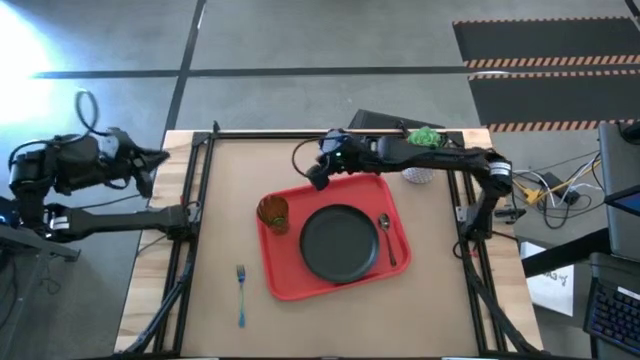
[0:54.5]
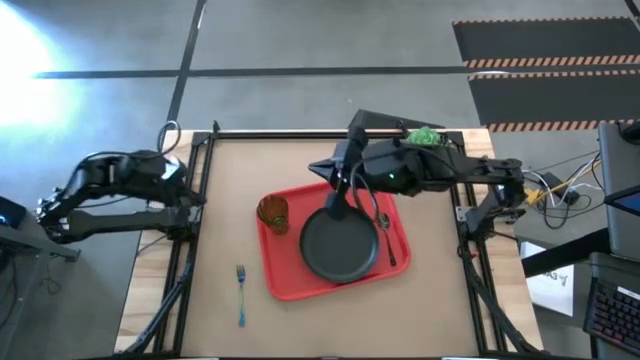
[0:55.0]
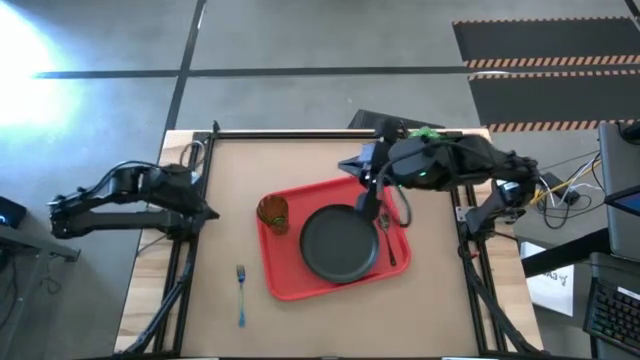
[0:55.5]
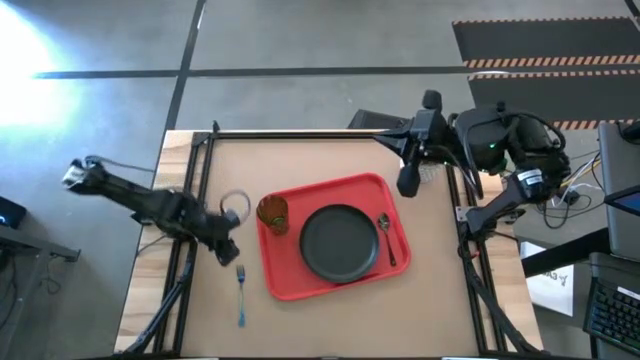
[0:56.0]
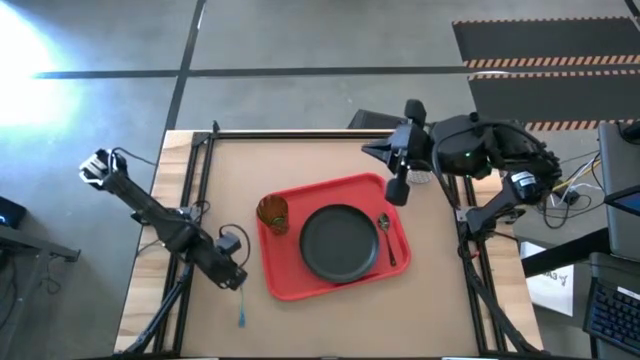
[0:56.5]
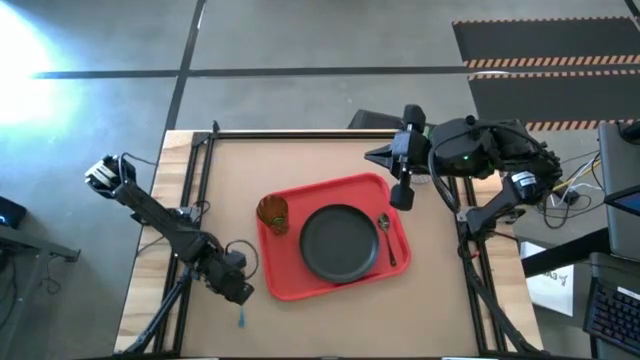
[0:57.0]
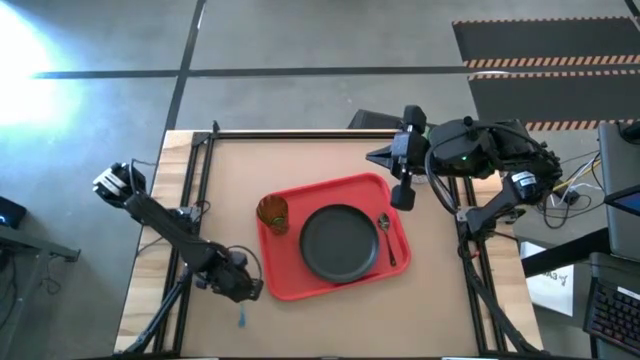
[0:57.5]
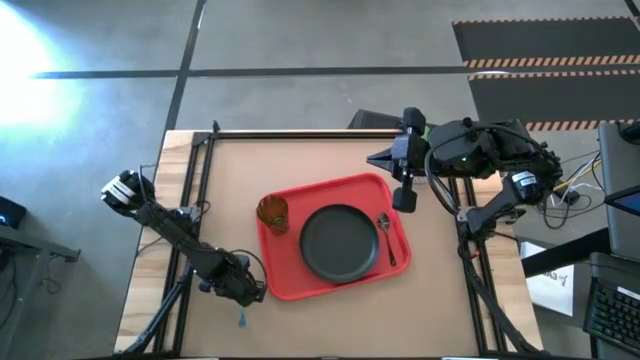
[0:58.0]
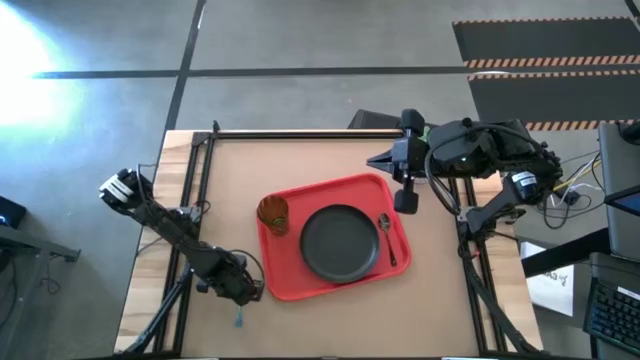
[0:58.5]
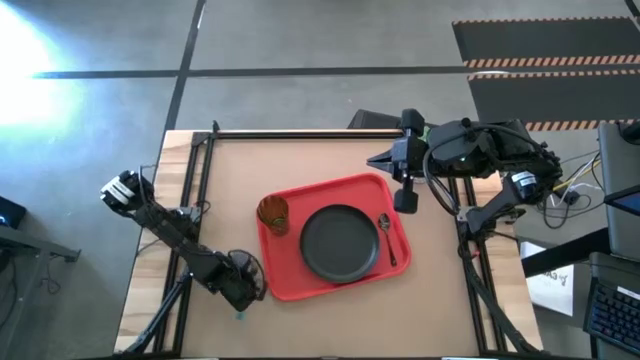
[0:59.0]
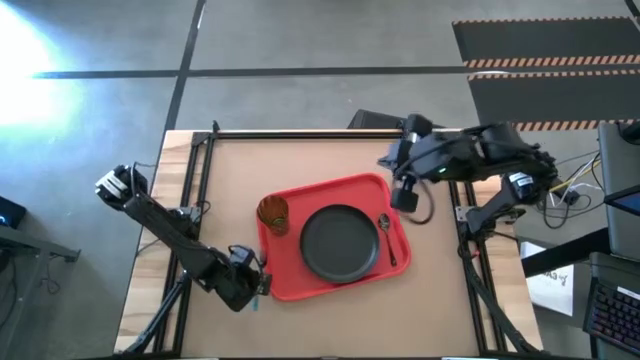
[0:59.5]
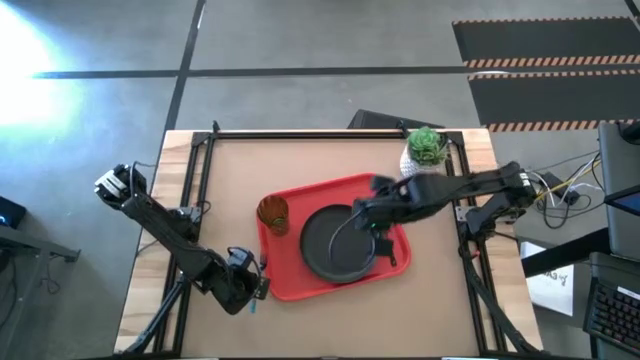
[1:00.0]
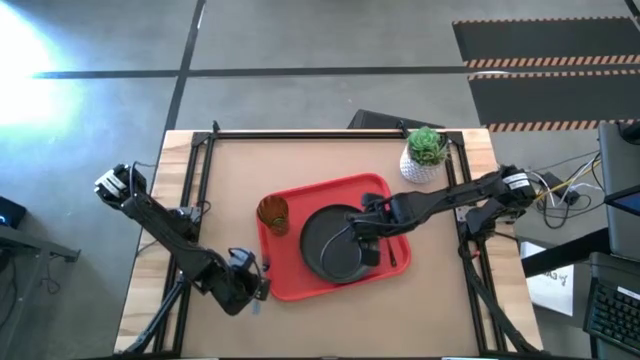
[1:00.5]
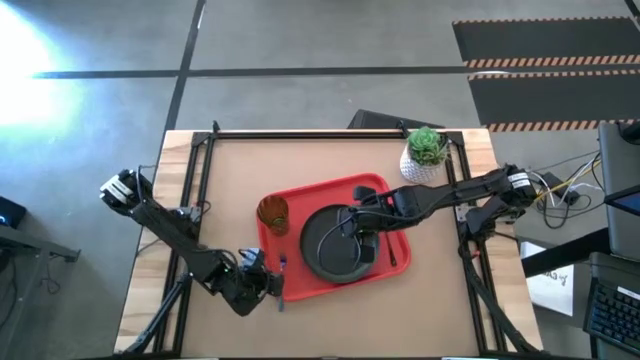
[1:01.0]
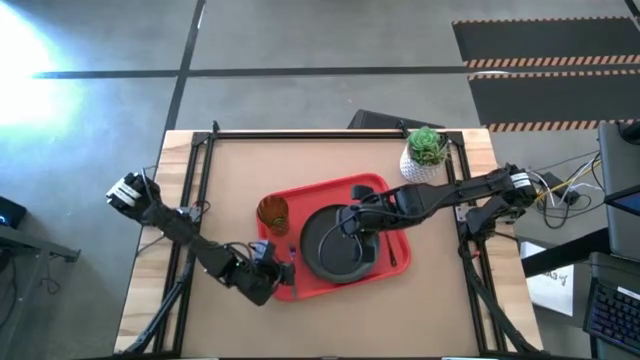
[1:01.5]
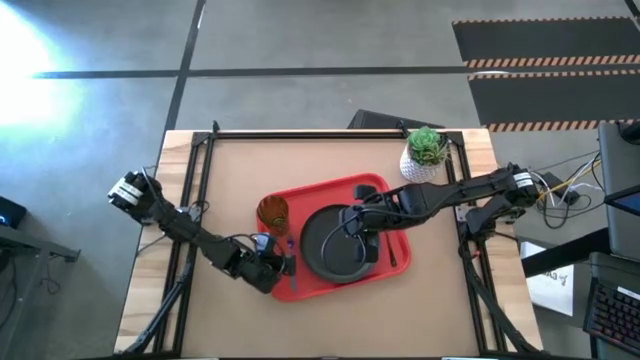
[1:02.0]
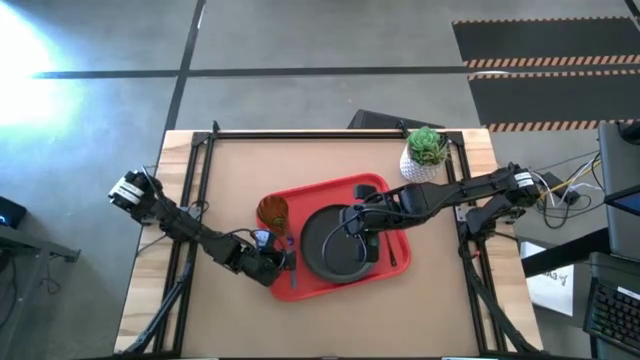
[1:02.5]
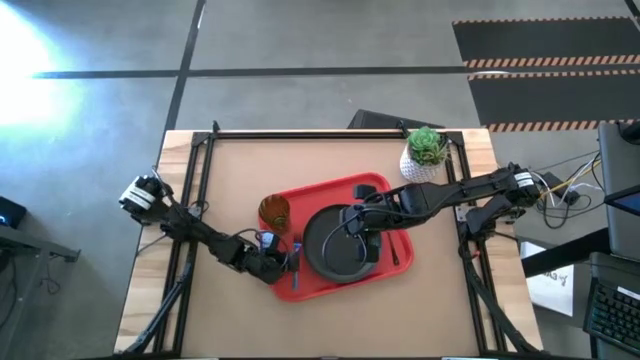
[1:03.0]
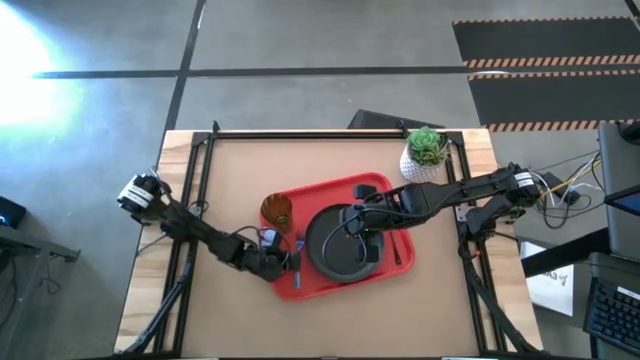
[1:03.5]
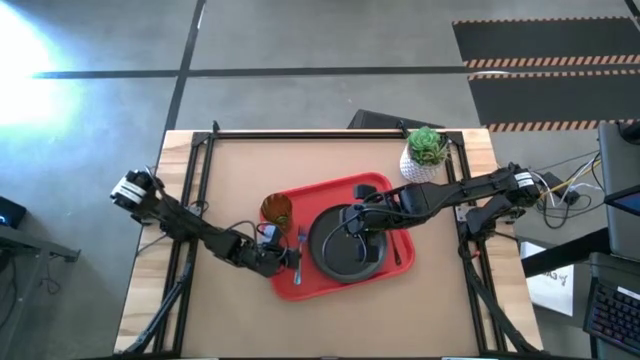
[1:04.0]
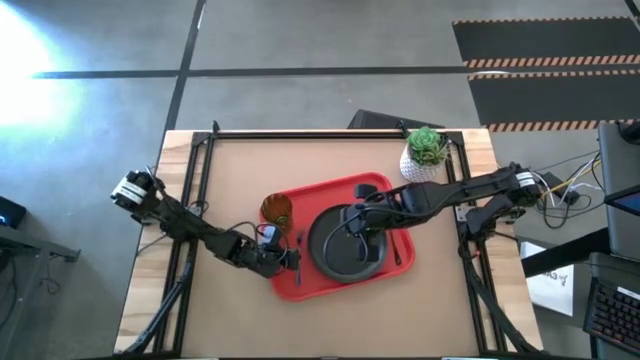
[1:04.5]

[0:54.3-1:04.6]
Task: Pick and place plate/cup/fork/spoon on tray
Put the blue fork to the left side of the black plate on the red serving tray

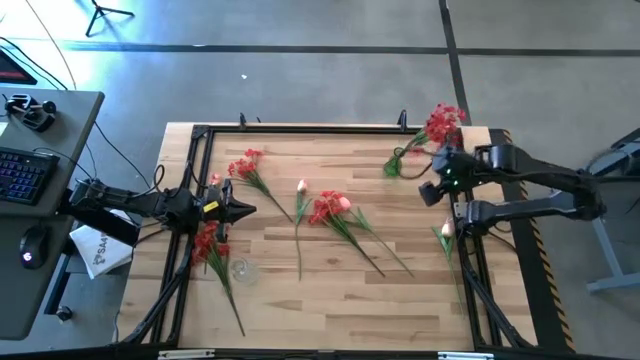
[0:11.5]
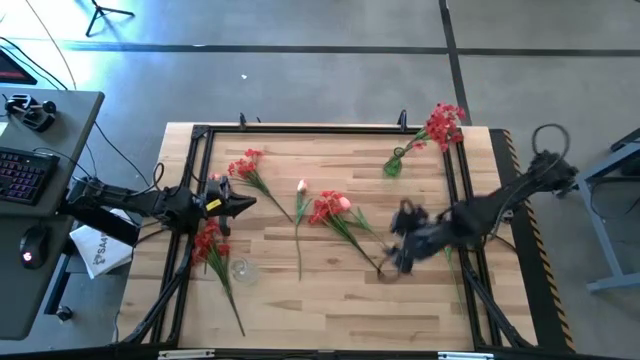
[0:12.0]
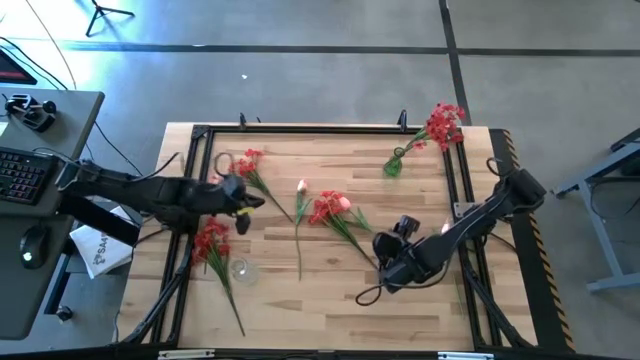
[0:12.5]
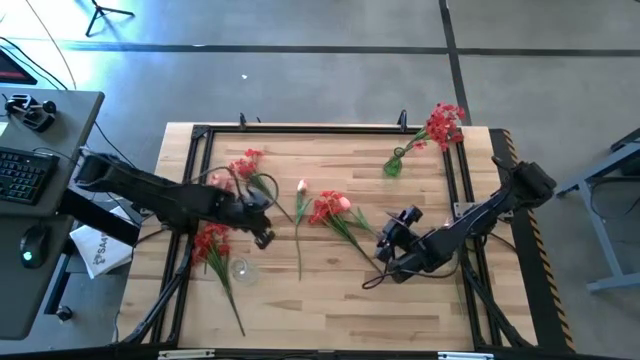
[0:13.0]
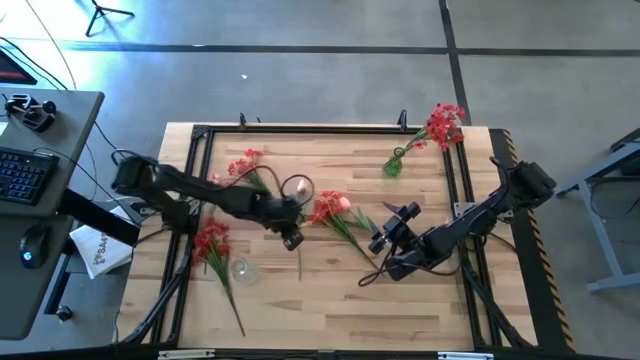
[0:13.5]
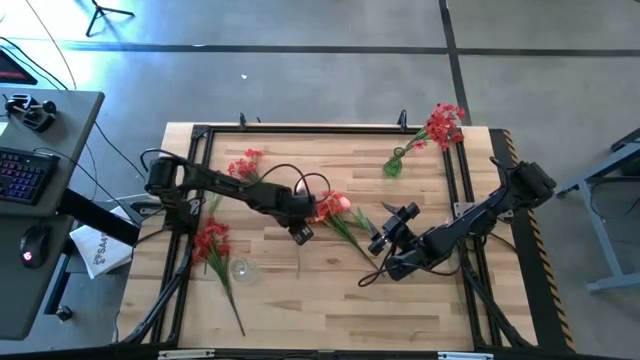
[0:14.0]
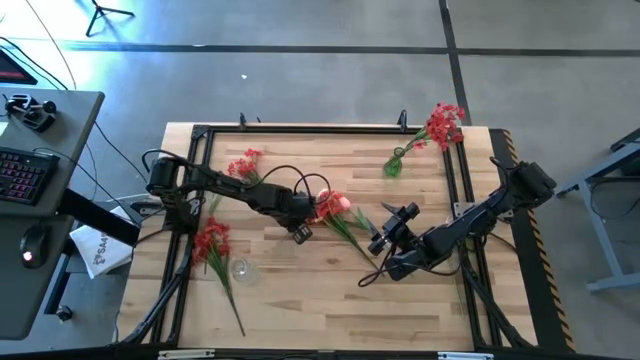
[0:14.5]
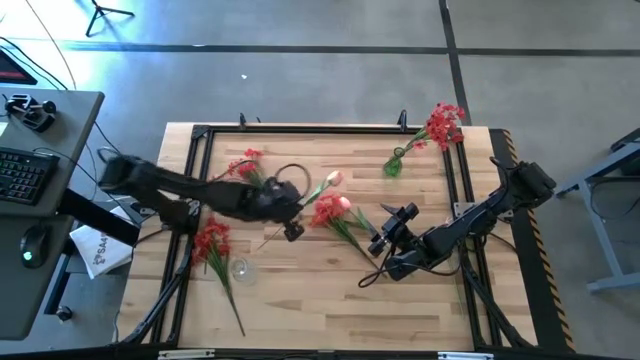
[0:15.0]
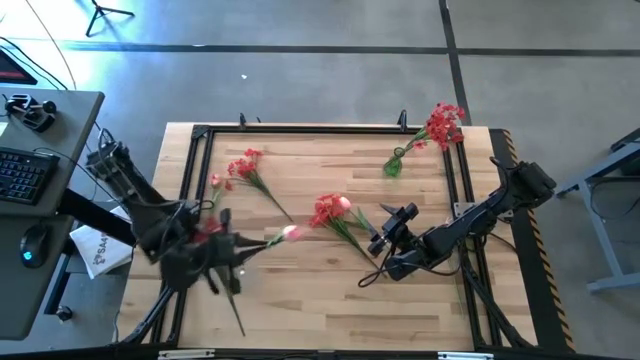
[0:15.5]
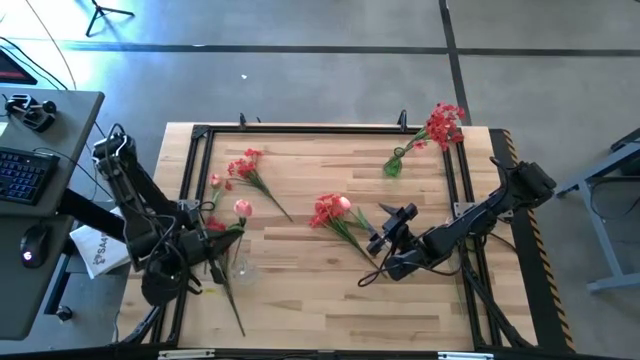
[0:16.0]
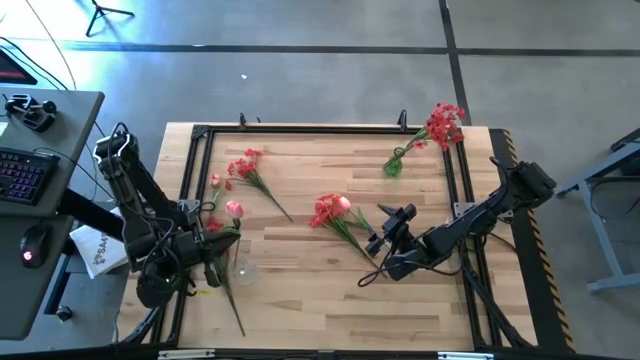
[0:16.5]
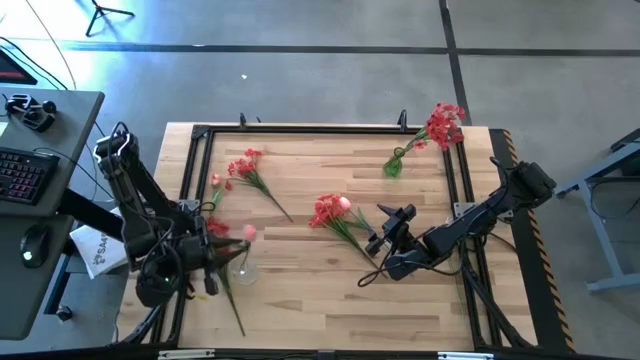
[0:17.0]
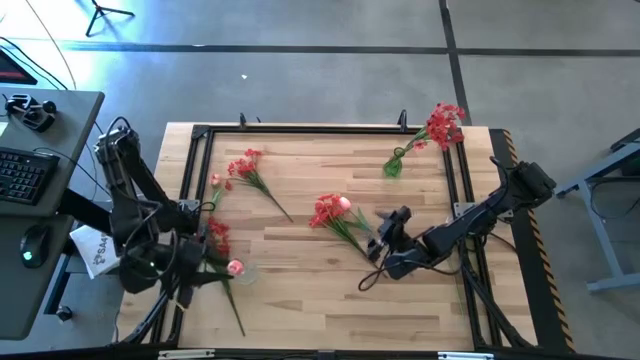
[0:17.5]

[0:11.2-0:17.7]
Task: Sort flowers into vase by color
Put the pink flower into the transparent vase

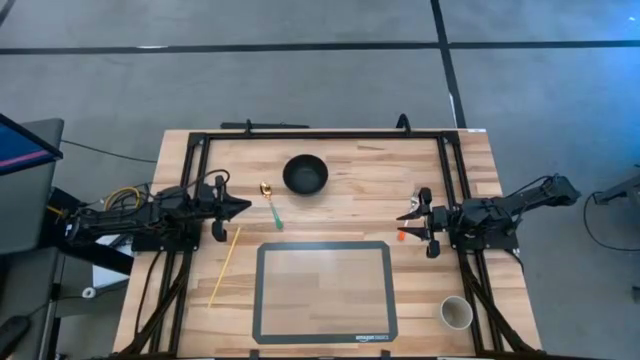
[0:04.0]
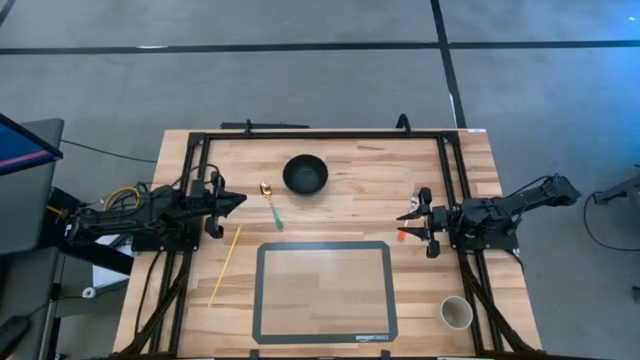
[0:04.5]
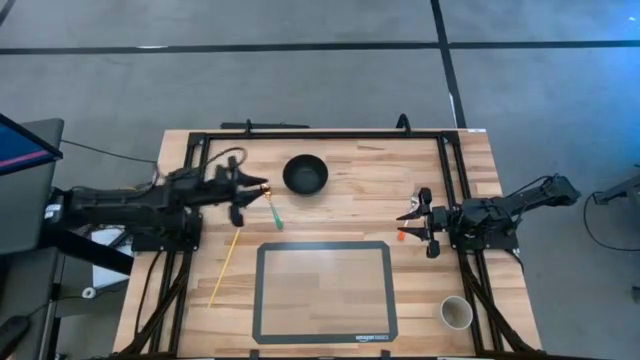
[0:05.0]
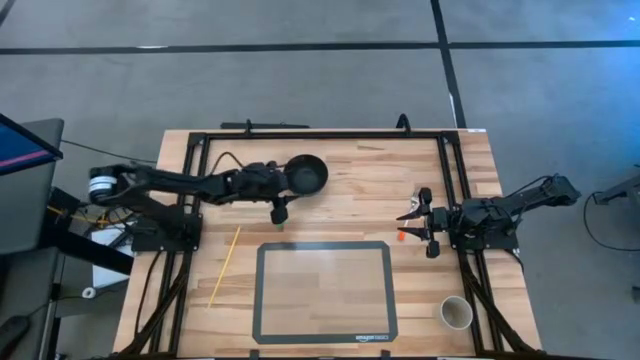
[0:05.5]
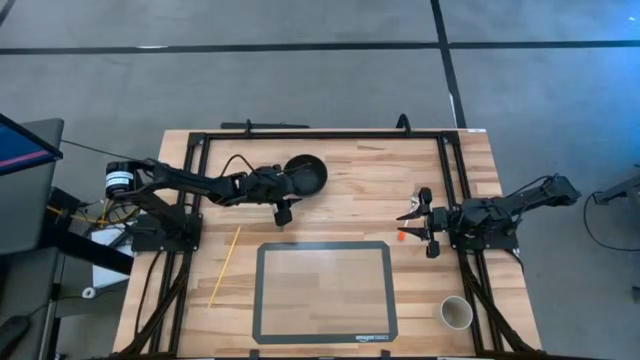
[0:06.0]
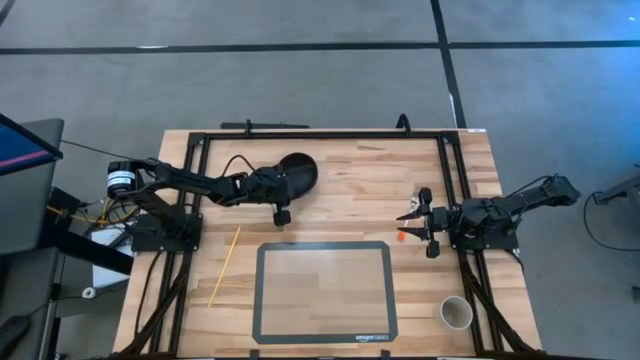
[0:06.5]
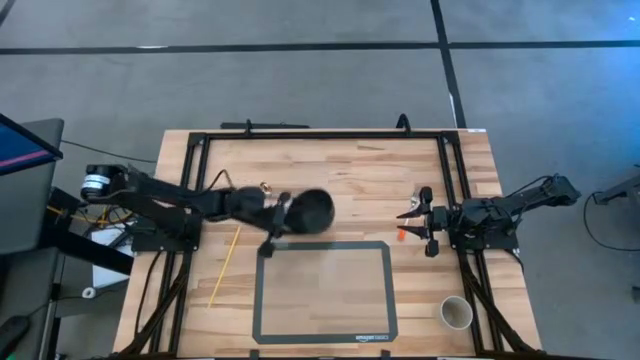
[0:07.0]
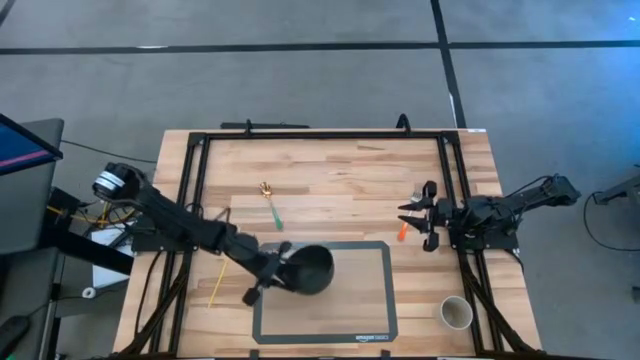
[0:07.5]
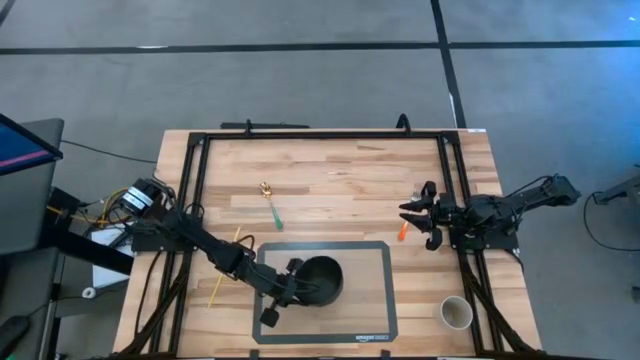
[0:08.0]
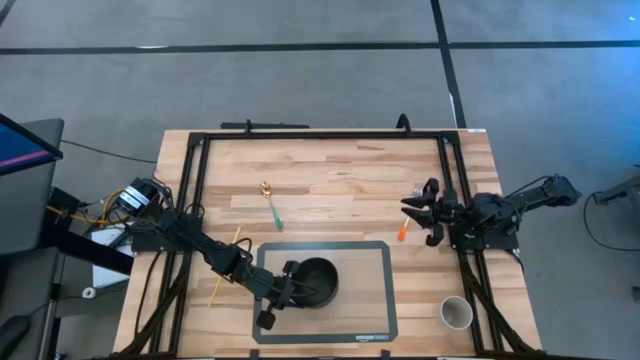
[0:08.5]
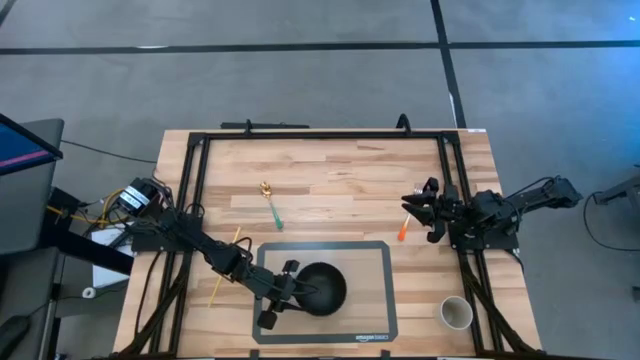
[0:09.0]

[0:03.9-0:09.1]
Task: Pick & Place Utensil
Put the black bowl on the transparent mat
